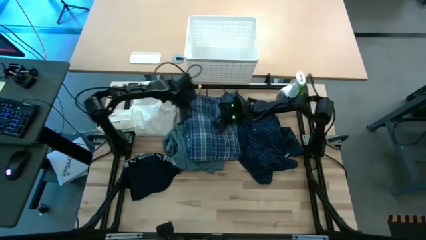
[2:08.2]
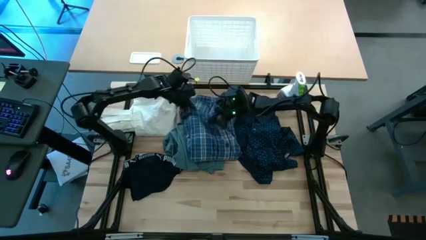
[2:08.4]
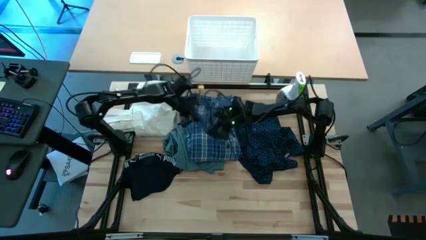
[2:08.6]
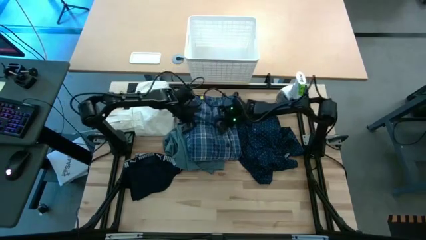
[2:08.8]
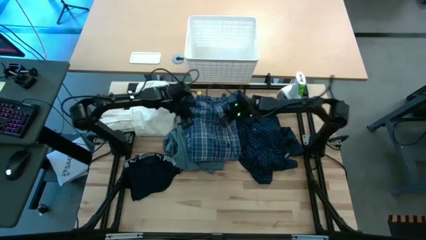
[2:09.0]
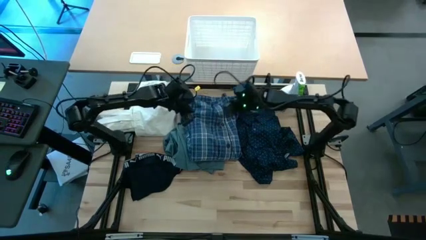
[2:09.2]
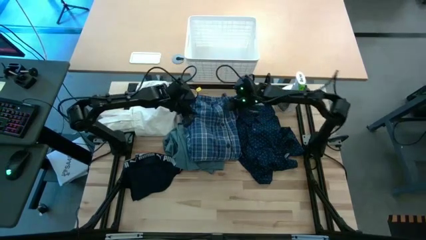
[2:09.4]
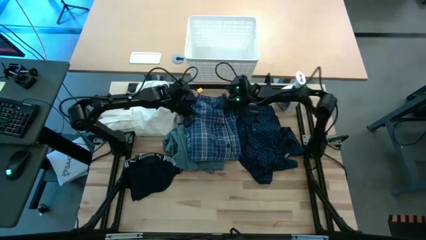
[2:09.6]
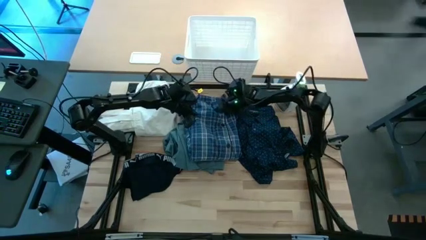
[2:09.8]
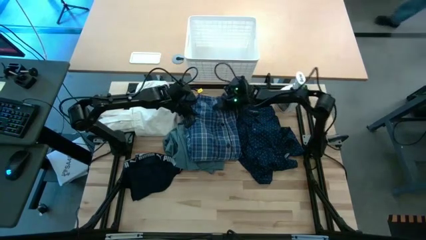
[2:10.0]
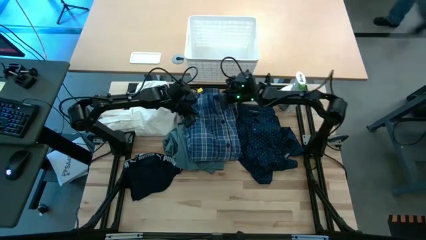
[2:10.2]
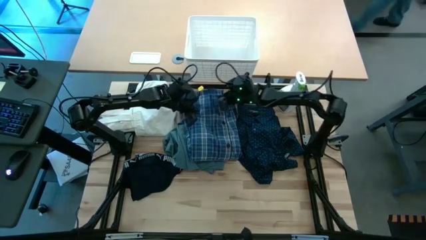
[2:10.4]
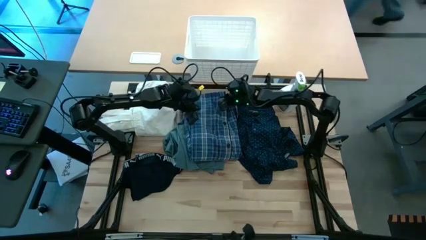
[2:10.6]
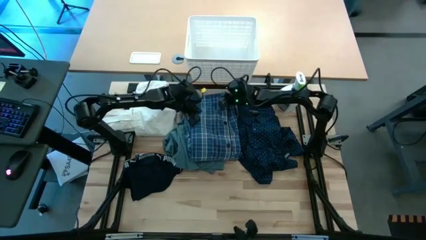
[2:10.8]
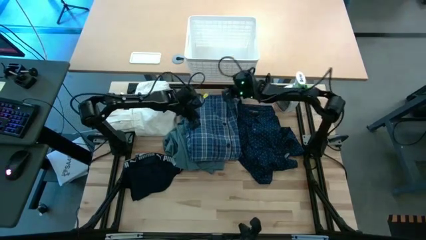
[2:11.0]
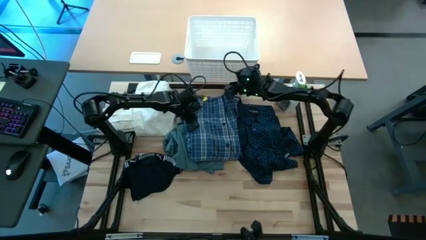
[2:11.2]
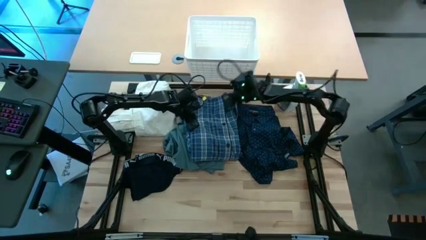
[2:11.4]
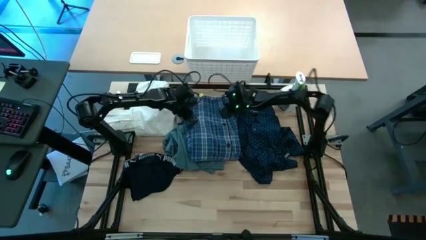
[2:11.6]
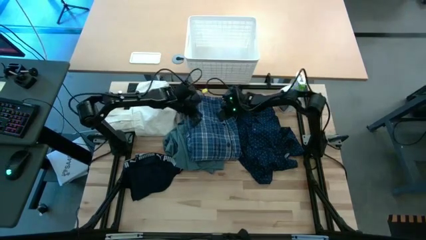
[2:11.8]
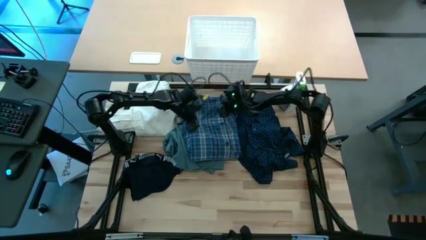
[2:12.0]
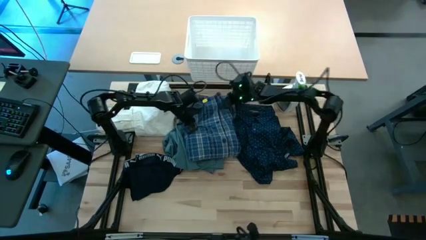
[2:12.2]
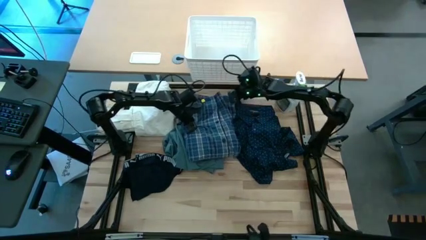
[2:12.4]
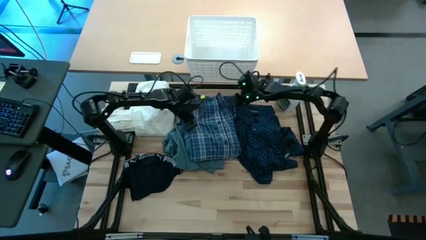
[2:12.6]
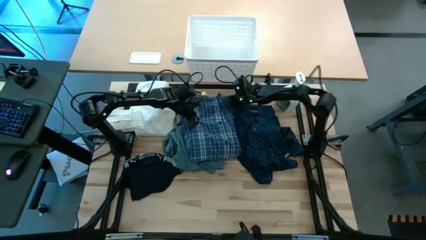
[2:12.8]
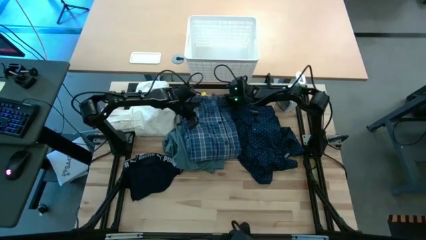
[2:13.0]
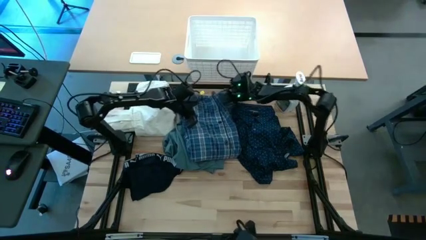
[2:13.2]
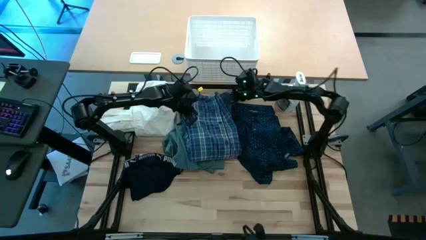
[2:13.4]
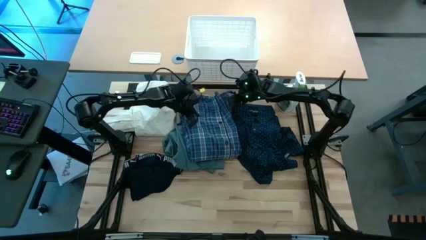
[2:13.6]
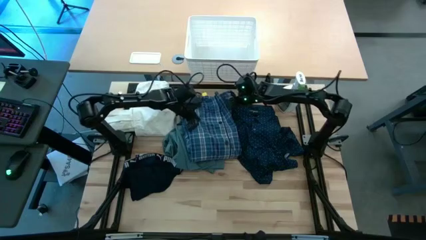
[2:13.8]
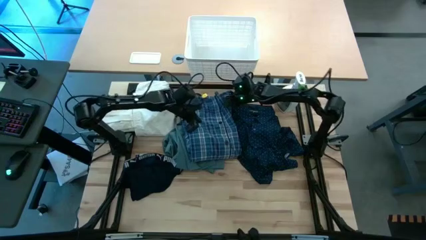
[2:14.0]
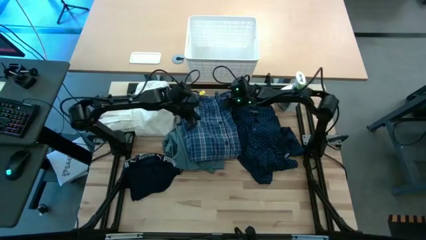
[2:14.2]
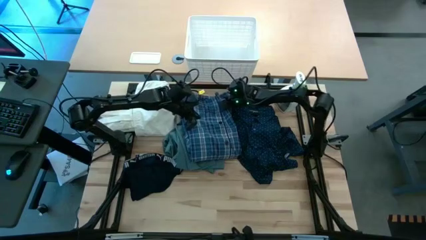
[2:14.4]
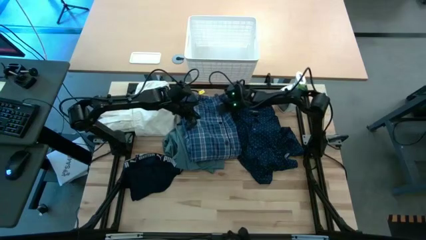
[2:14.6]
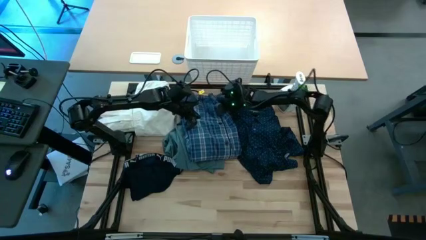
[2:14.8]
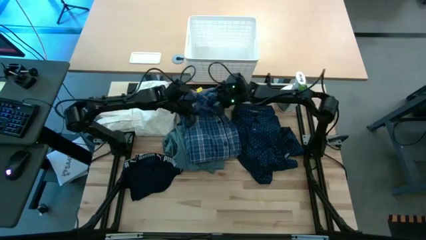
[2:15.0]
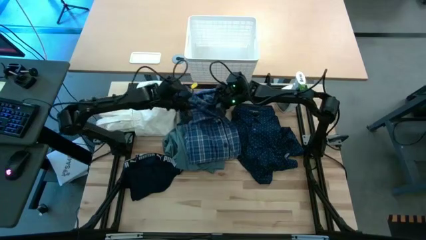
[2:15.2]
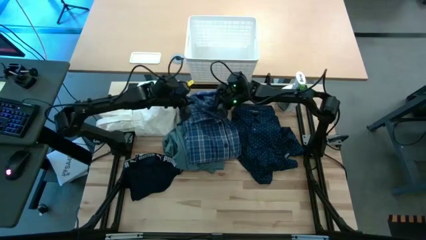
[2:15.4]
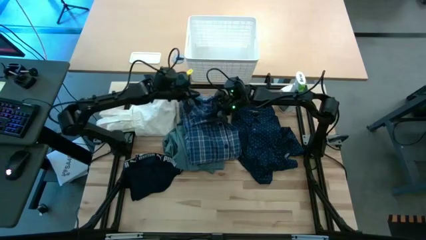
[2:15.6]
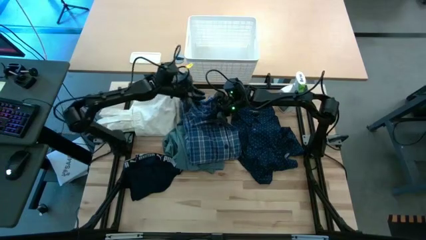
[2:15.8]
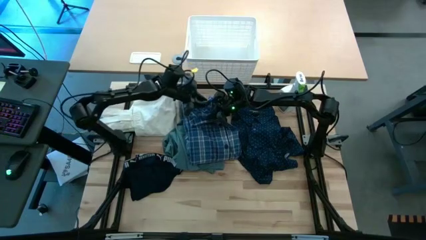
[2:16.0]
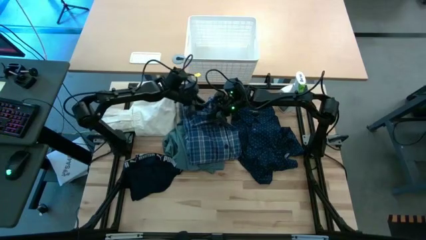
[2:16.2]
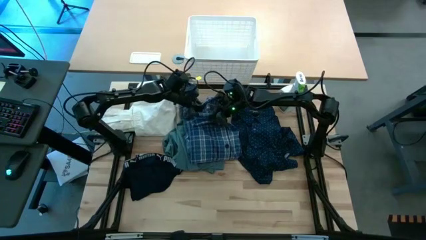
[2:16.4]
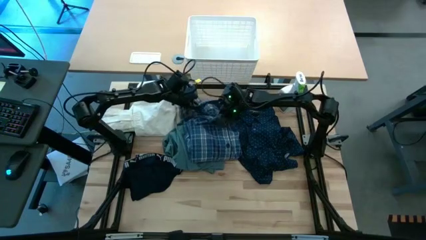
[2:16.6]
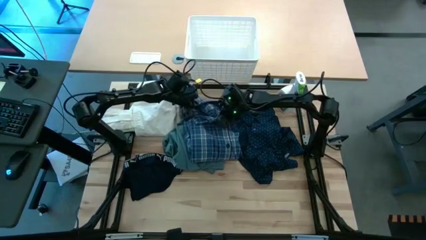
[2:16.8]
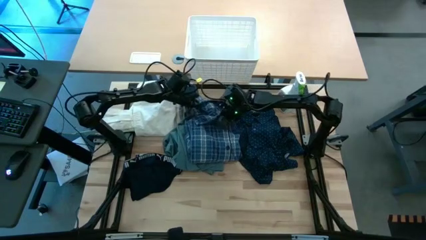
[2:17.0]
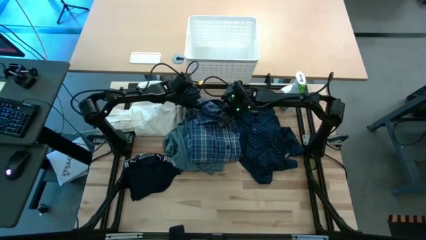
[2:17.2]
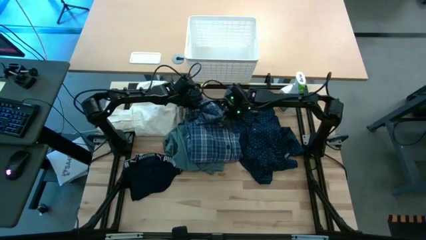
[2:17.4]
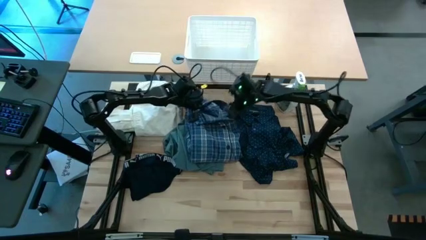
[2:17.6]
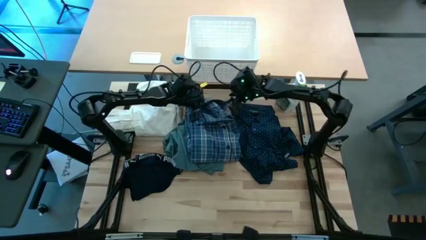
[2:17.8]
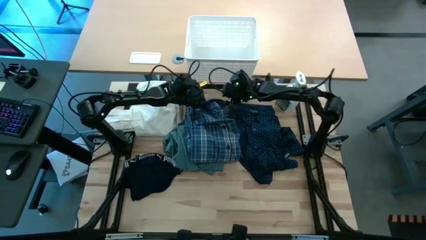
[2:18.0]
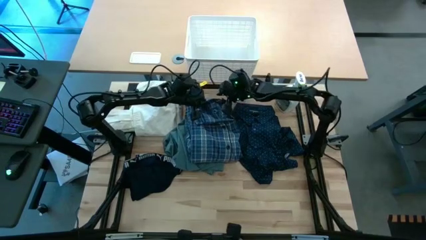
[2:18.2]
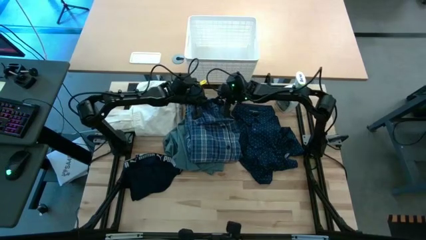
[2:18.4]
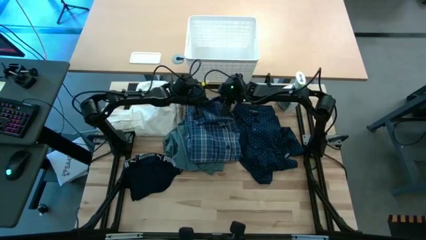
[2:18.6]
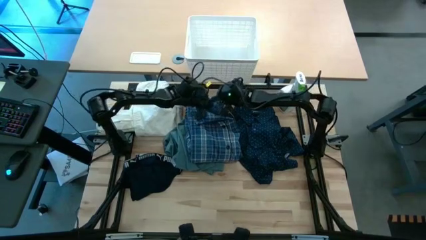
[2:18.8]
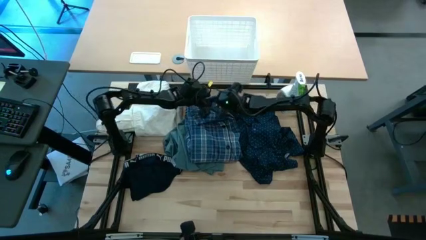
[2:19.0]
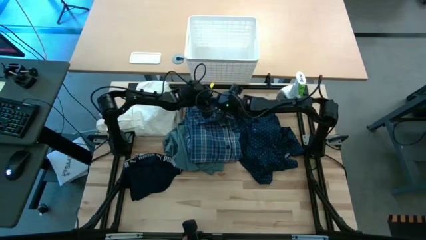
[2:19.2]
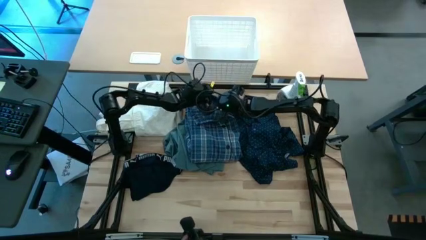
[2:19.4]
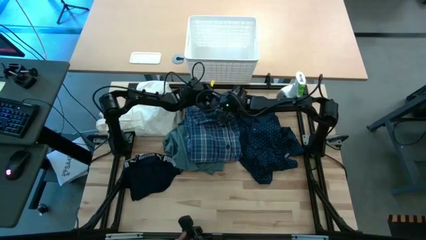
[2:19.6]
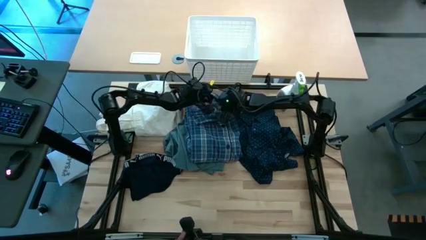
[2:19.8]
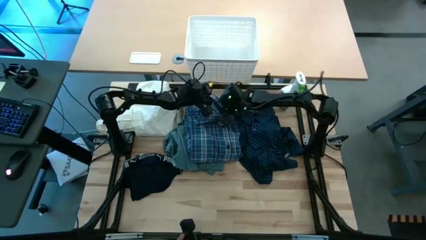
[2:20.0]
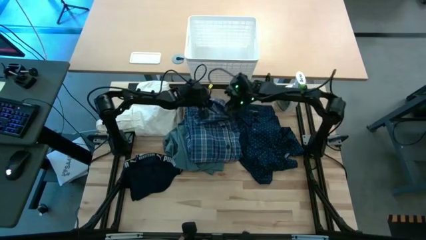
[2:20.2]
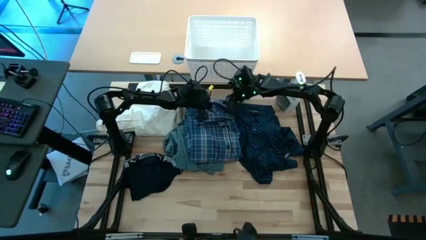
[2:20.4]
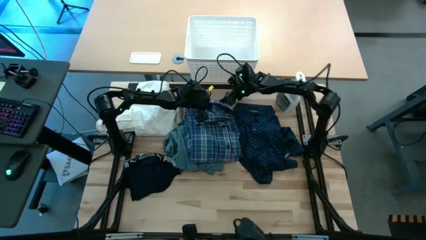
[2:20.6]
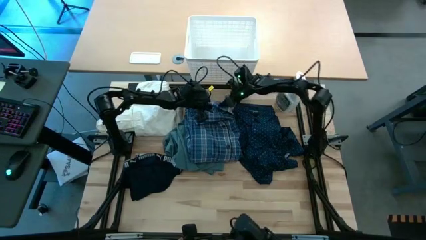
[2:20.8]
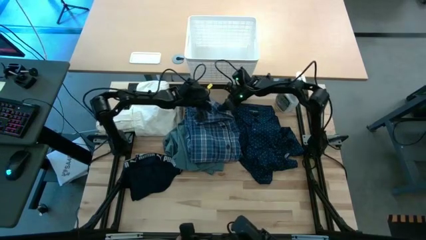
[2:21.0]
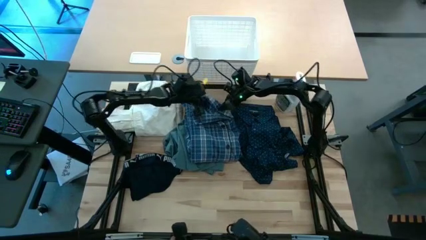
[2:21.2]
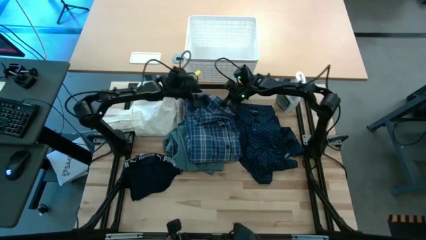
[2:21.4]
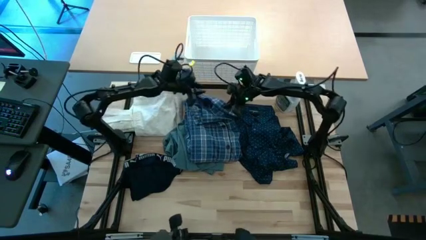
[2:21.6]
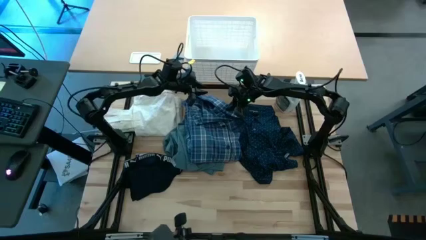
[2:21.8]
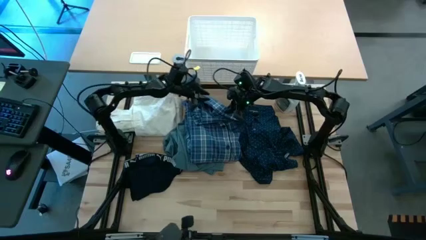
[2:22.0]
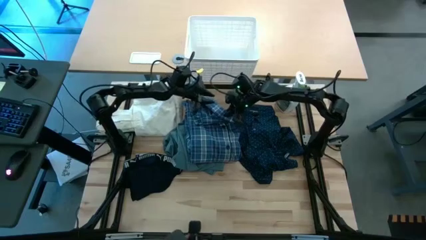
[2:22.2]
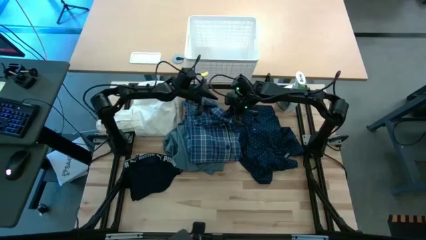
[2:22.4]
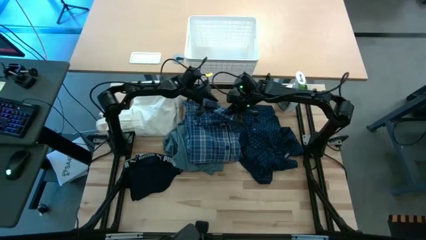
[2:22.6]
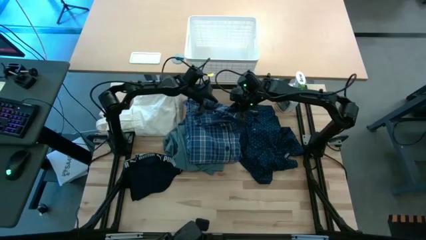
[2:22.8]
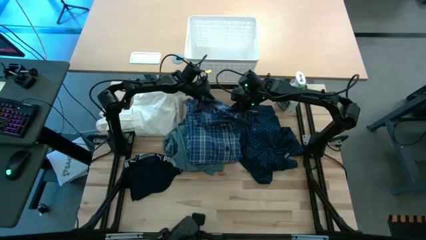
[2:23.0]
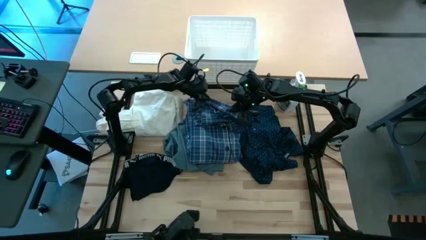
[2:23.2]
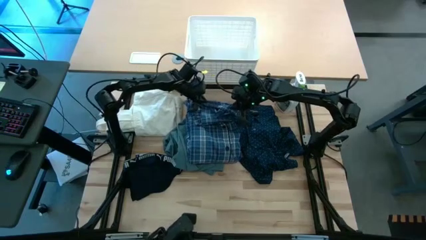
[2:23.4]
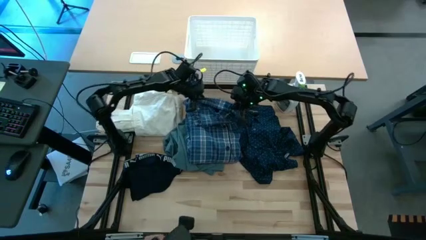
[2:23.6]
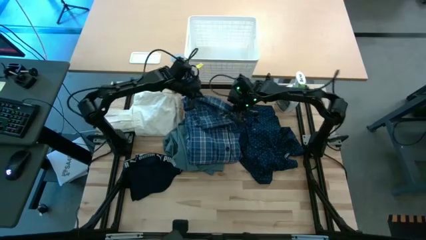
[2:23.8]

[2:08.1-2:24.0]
Fold the checkered blue polo
